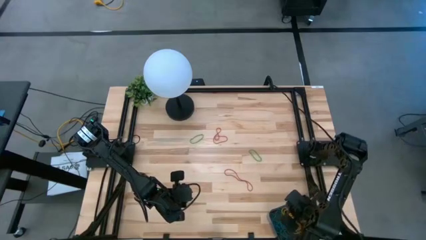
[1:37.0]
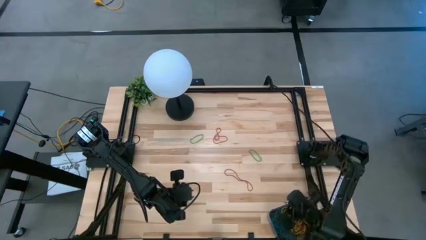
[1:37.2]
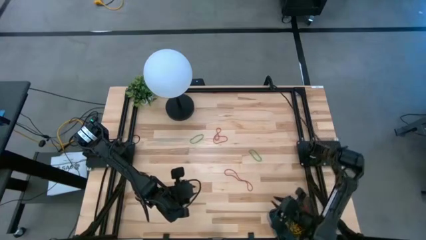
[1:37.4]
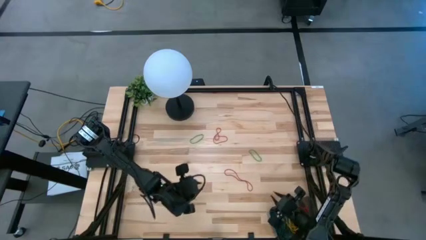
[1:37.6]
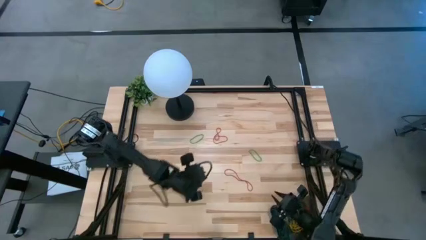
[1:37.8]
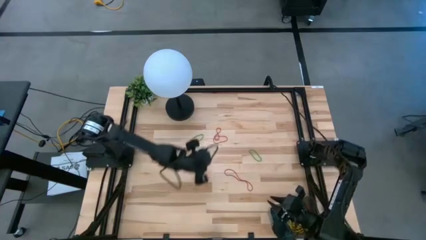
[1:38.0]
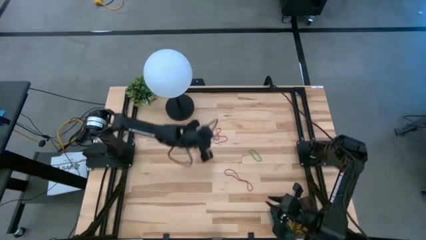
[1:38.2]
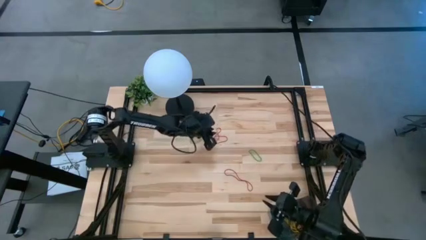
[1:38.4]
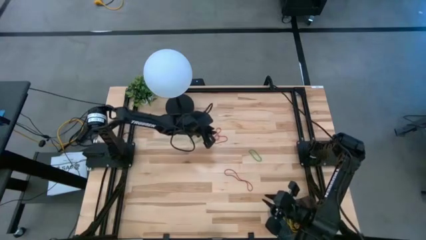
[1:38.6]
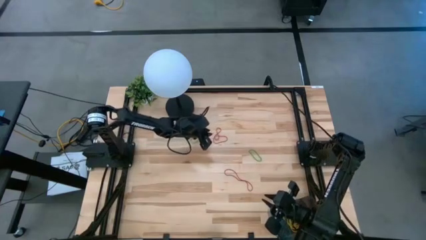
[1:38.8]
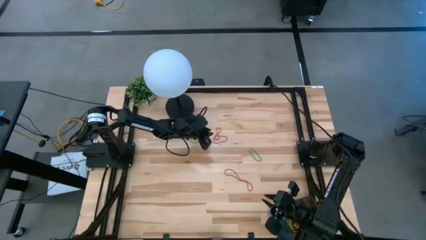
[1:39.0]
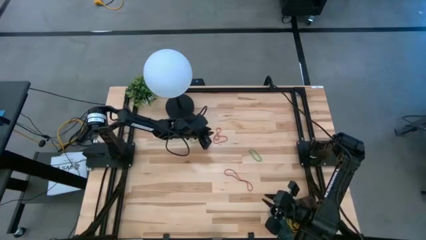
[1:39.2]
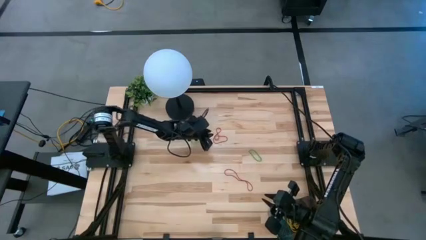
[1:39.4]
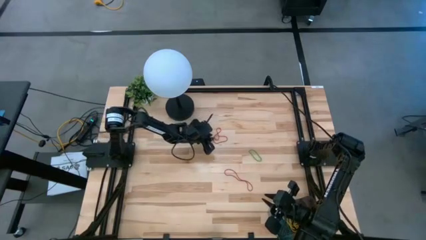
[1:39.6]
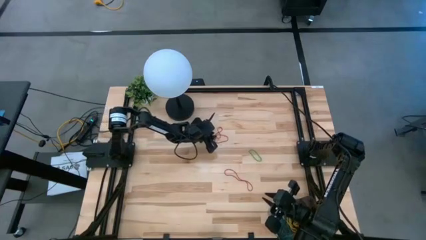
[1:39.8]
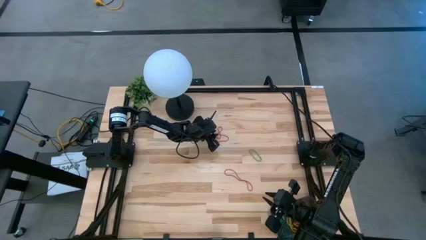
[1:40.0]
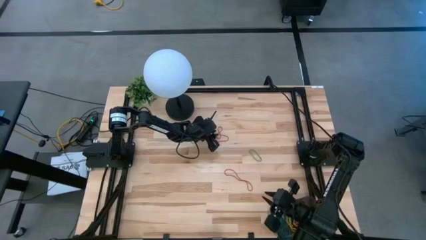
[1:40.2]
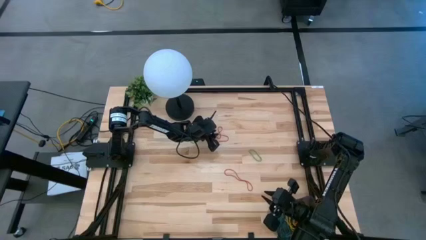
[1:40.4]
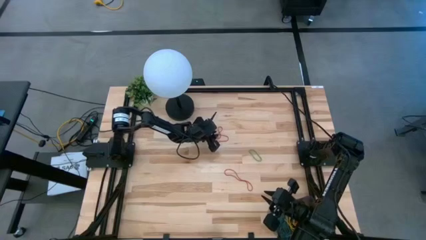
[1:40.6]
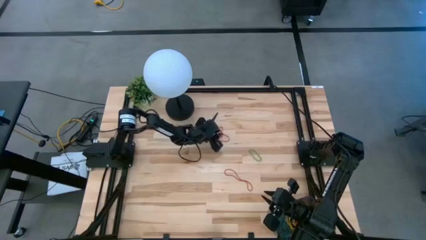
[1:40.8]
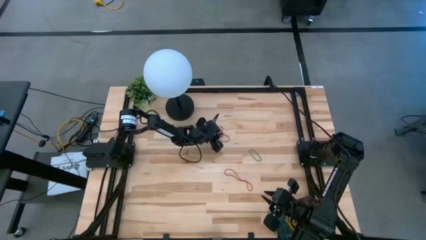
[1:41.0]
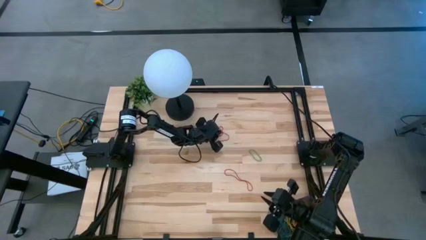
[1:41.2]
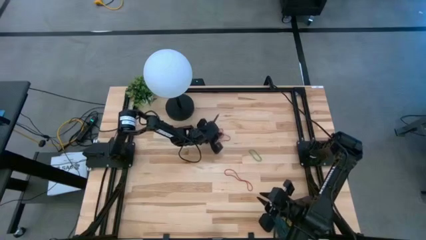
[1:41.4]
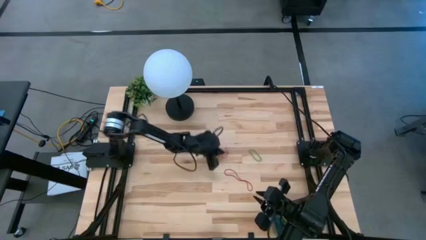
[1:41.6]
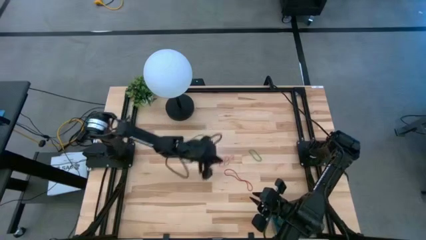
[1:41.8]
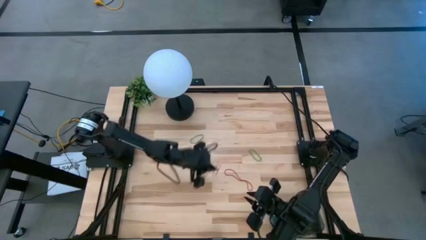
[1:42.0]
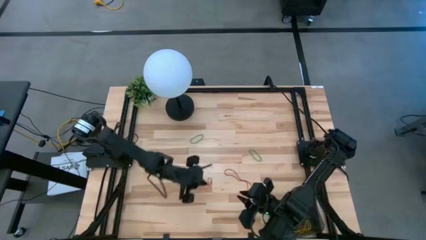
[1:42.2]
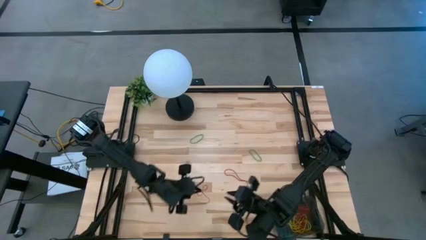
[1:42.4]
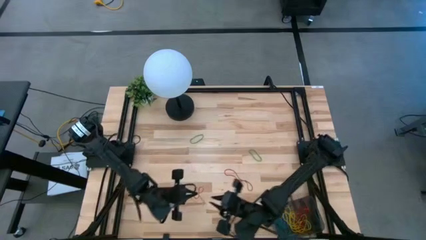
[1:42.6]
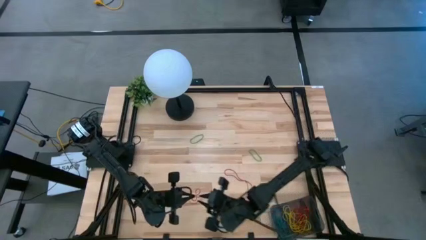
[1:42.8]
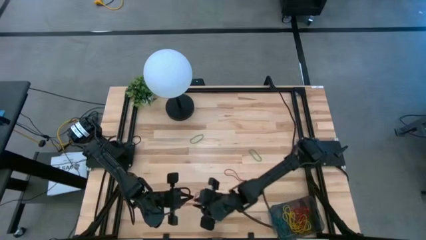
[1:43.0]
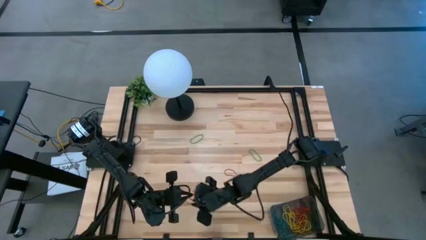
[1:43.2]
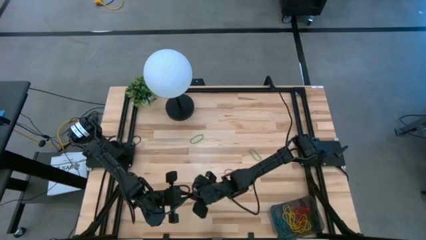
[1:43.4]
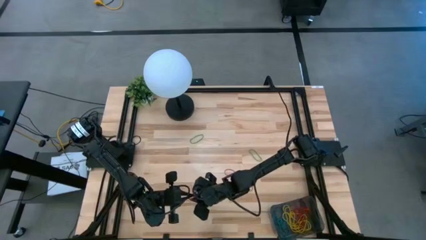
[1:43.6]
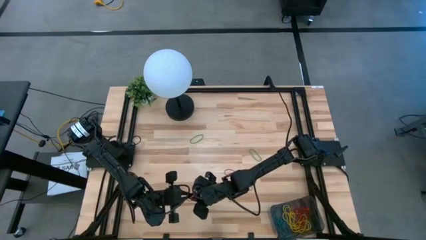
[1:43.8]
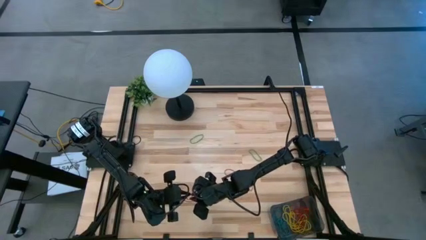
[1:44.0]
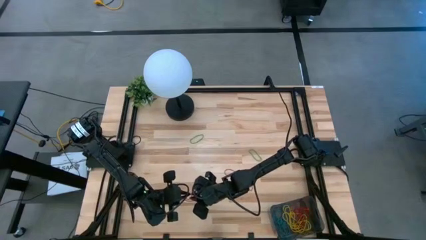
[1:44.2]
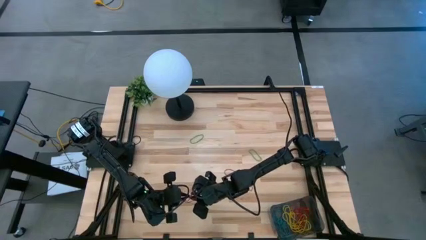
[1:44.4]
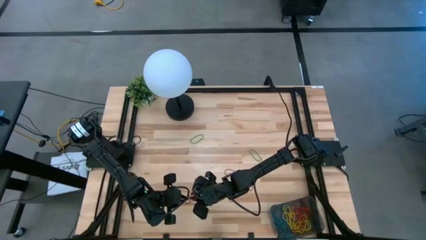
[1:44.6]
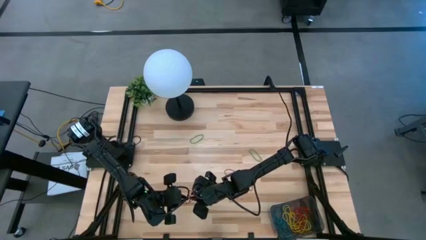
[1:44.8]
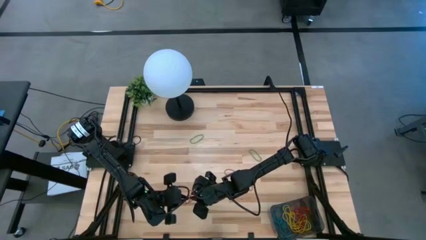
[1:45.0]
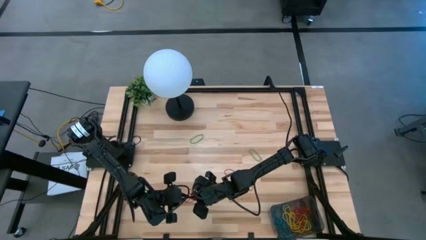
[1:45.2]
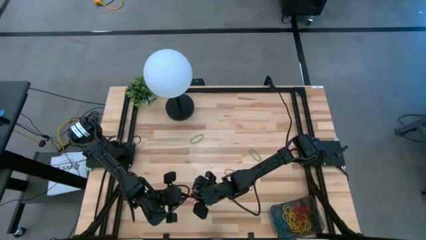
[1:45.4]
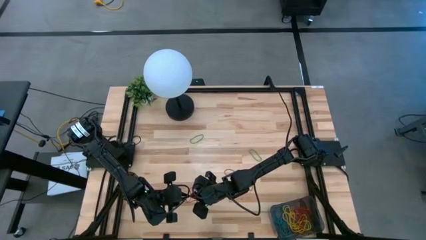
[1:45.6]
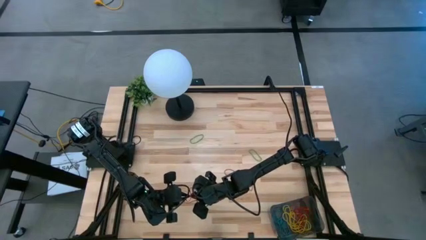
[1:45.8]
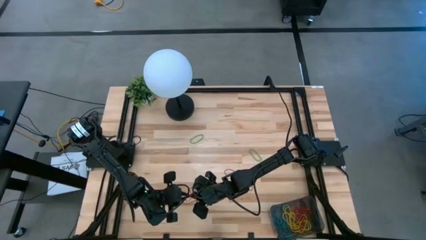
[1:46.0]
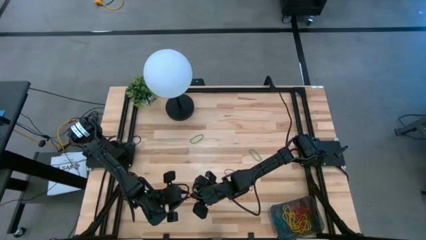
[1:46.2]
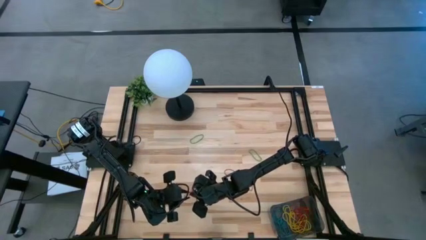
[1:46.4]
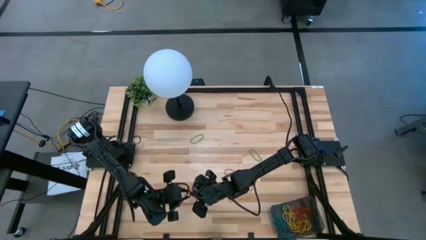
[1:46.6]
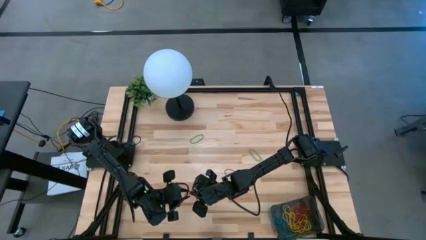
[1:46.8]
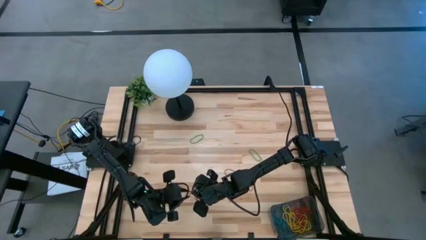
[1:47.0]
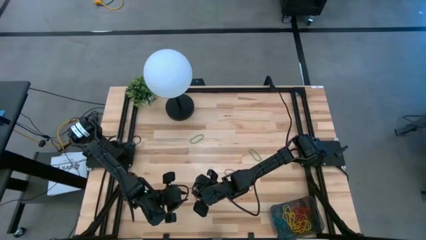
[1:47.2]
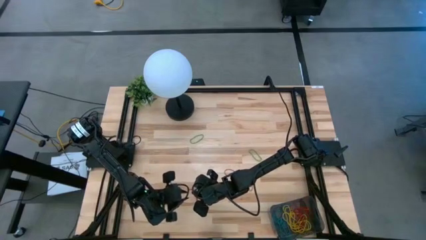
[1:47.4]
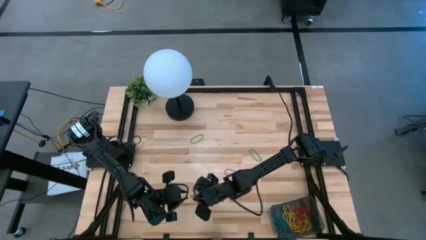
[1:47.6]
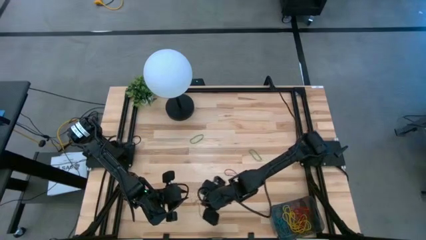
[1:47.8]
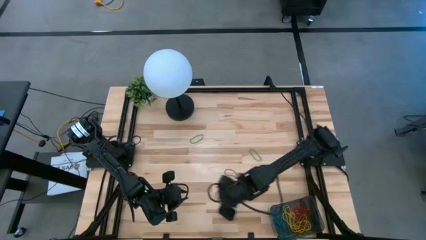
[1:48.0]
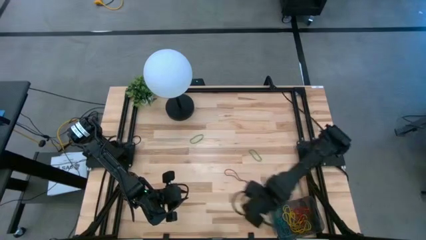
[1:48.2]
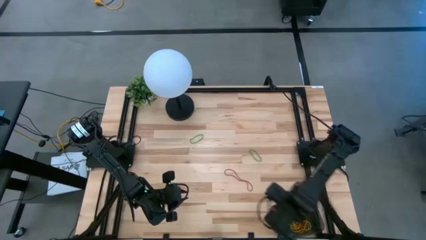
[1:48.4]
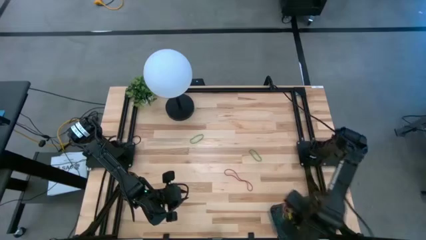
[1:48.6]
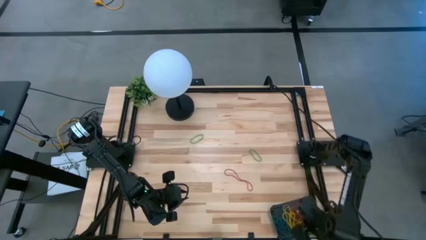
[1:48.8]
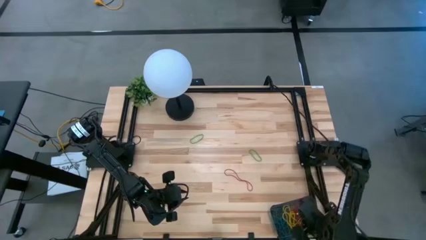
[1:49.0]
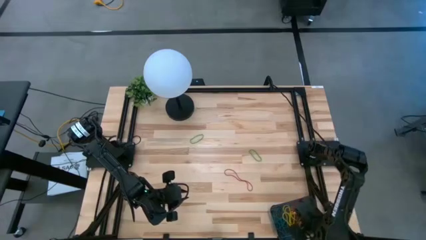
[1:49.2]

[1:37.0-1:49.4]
Task: Pick and place items into bin
Put the red rubber band into the black bin

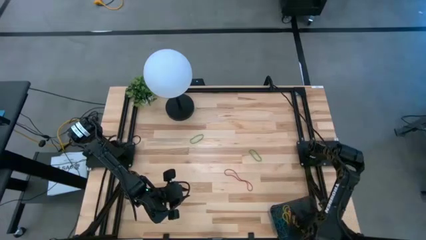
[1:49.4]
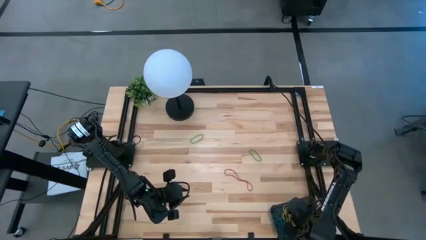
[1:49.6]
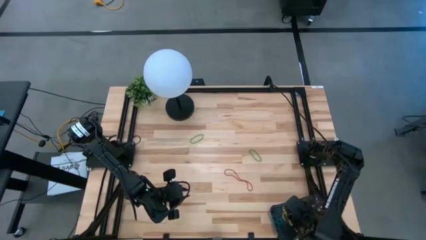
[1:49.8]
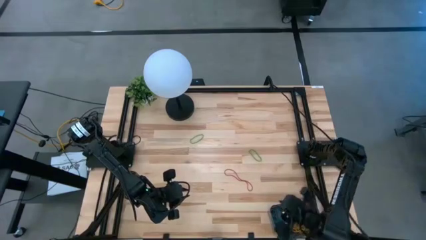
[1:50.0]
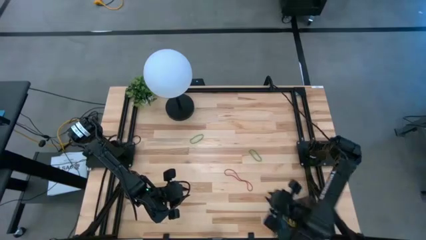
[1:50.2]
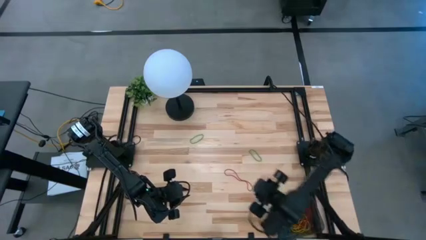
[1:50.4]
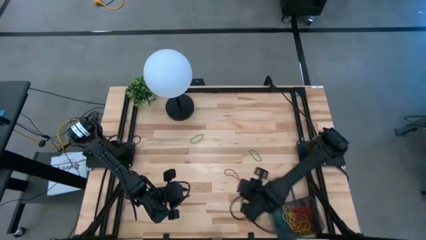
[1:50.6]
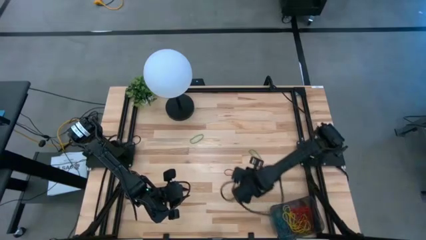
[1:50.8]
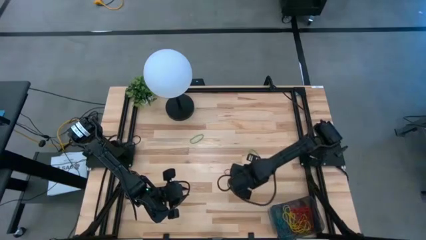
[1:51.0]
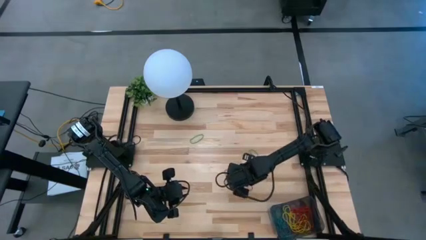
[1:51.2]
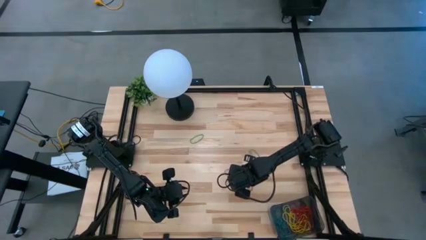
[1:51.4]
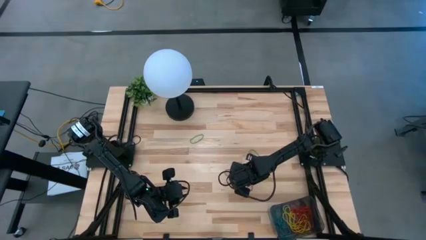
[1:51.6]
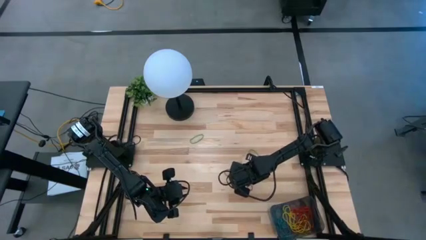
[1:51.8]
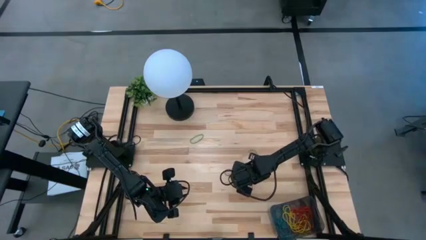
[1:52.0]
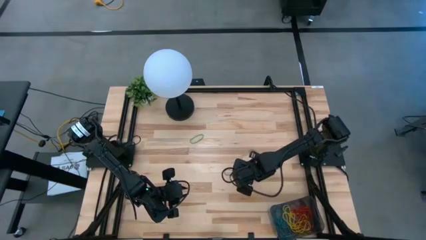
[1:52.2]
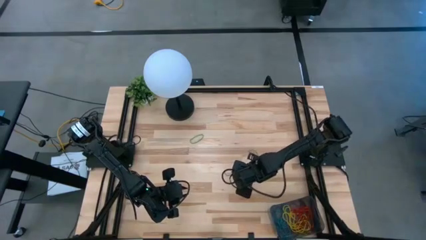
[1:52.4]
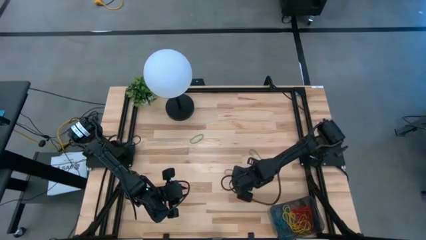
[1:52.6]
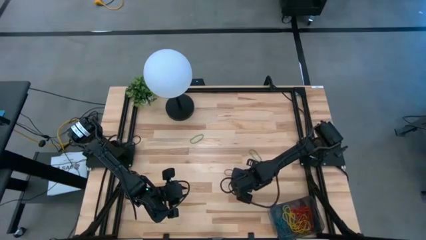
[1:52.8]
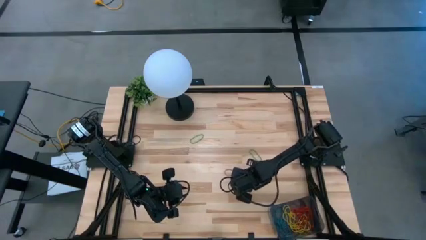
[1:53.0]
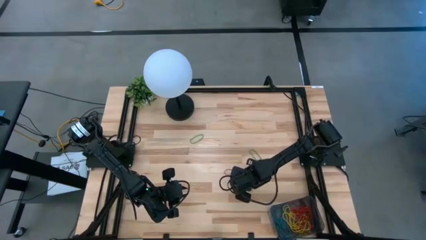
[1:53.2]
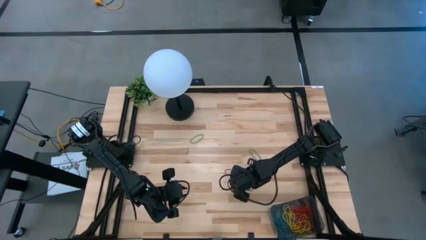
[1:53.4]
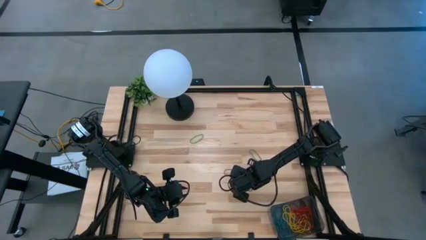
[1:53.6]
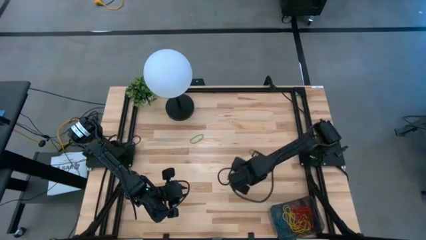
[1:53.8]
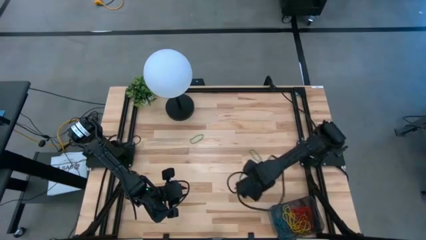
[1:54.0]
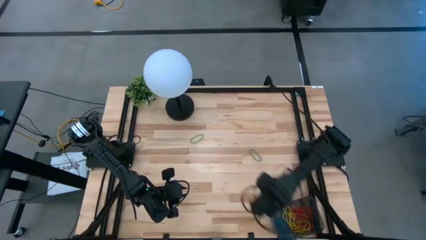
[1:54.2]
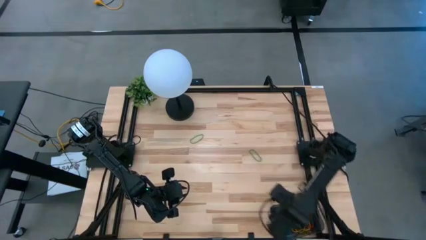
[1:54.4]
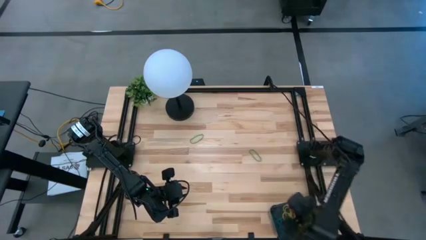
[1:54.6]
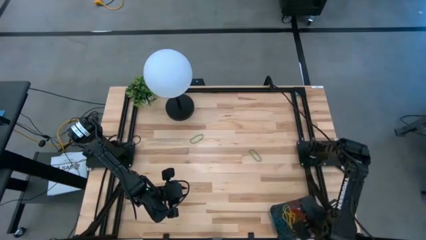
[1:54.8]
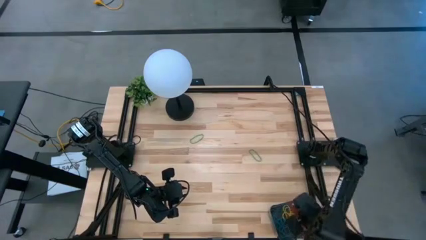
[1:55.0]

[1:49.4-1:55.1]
Put the red rubber band into the black bin
